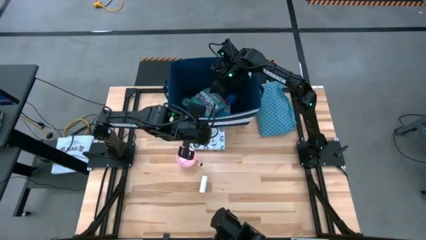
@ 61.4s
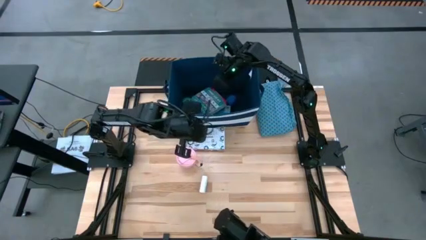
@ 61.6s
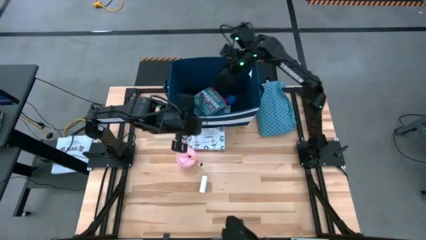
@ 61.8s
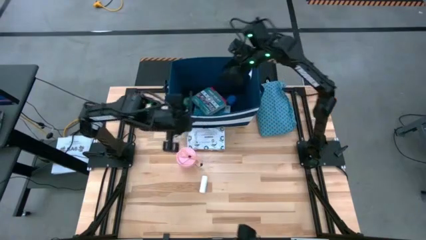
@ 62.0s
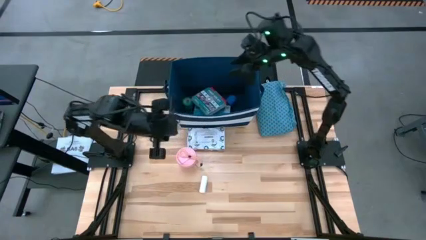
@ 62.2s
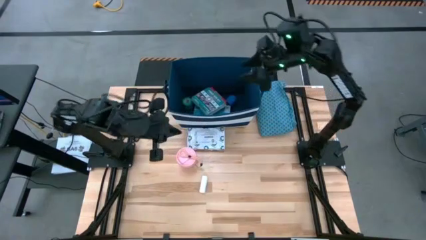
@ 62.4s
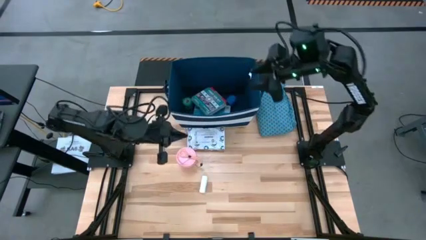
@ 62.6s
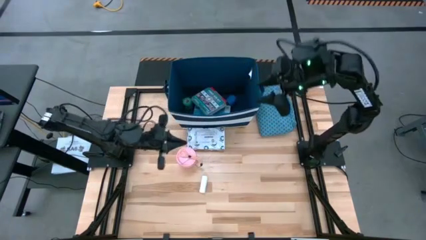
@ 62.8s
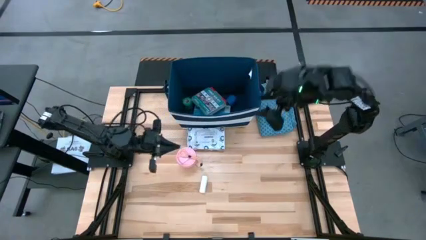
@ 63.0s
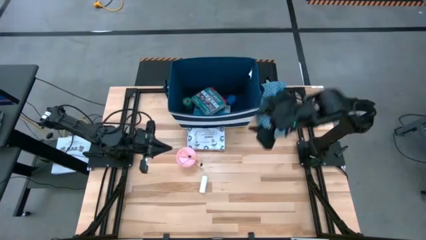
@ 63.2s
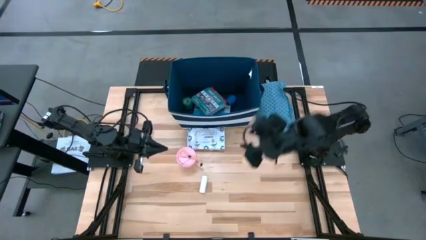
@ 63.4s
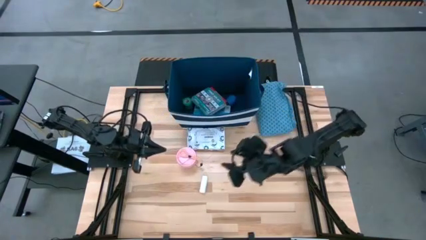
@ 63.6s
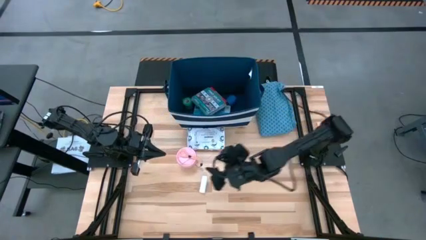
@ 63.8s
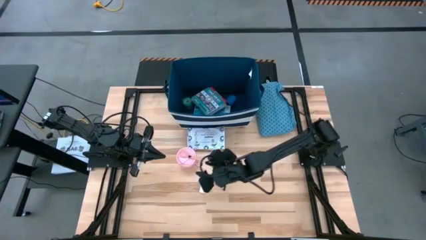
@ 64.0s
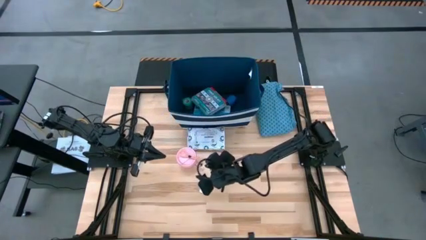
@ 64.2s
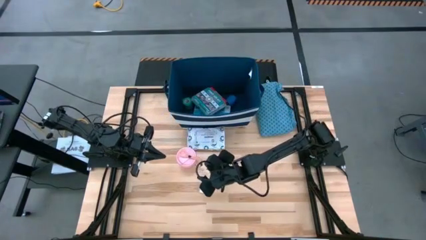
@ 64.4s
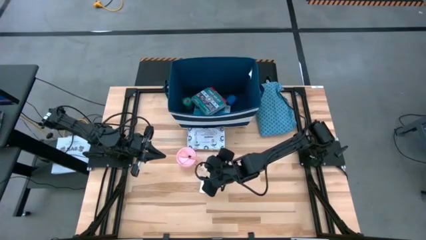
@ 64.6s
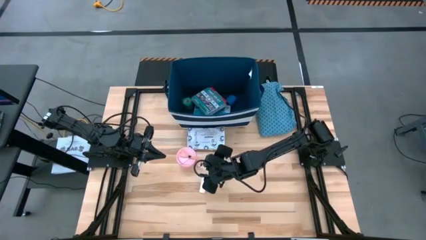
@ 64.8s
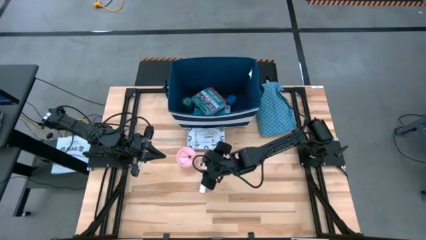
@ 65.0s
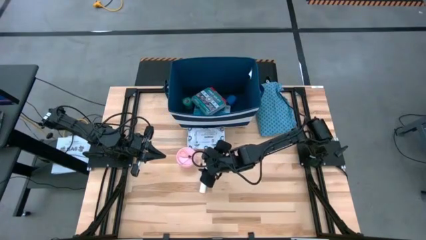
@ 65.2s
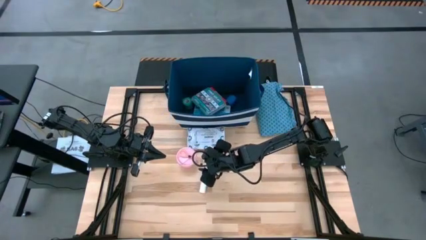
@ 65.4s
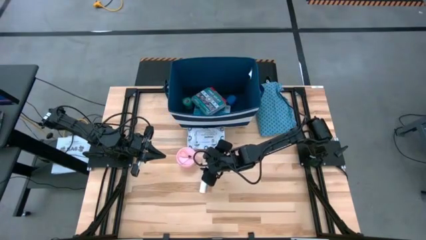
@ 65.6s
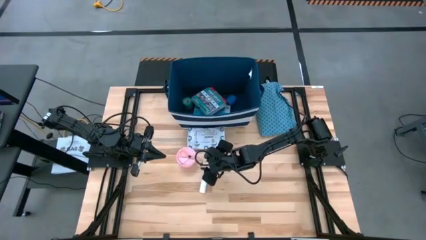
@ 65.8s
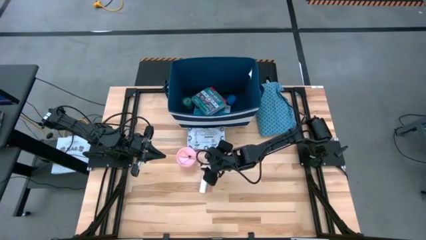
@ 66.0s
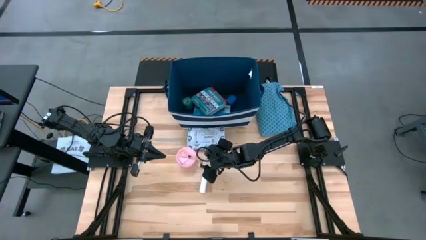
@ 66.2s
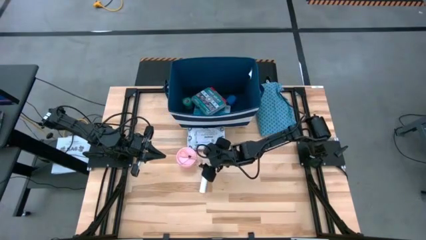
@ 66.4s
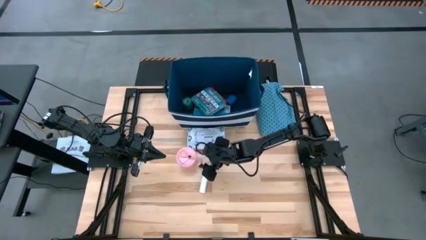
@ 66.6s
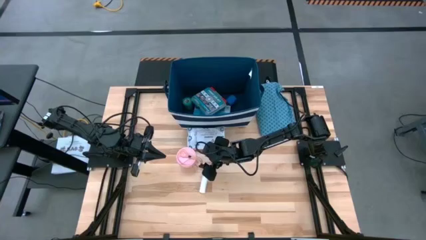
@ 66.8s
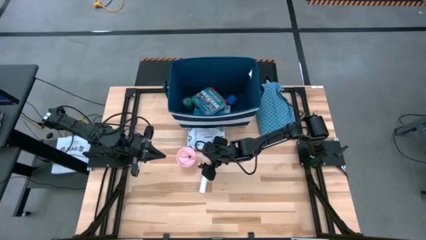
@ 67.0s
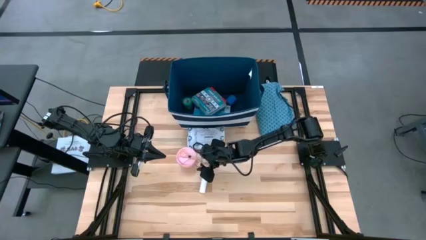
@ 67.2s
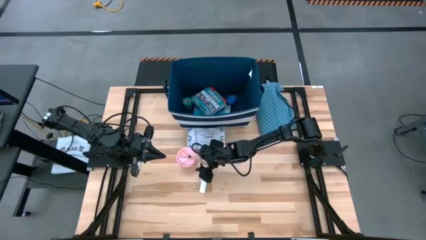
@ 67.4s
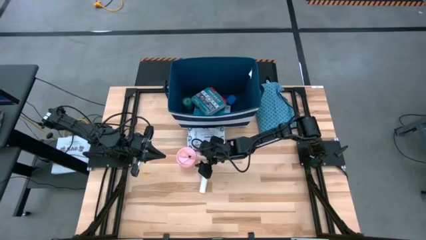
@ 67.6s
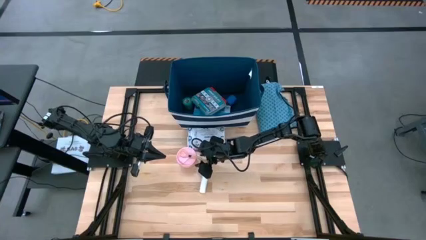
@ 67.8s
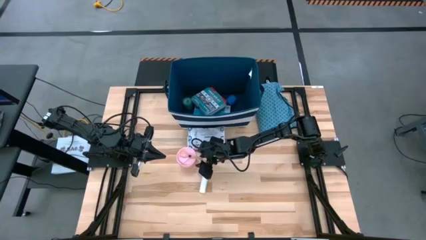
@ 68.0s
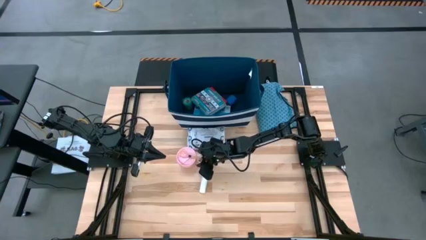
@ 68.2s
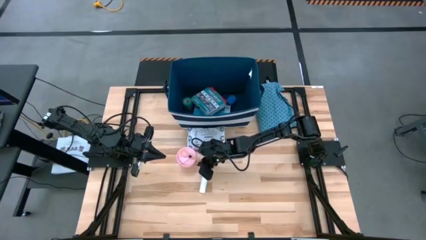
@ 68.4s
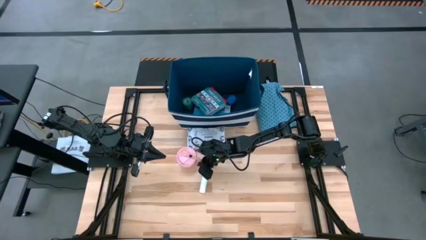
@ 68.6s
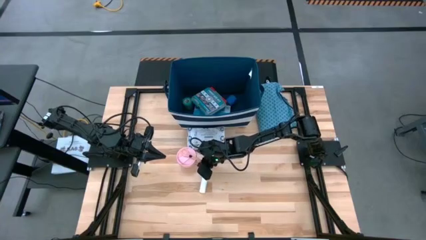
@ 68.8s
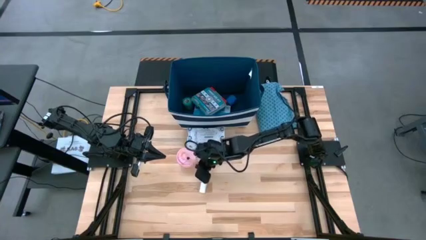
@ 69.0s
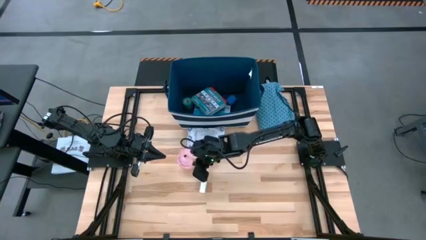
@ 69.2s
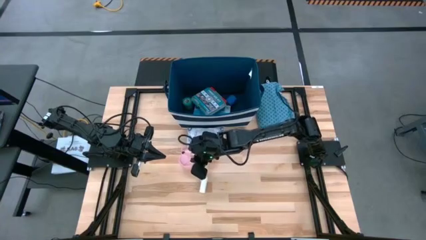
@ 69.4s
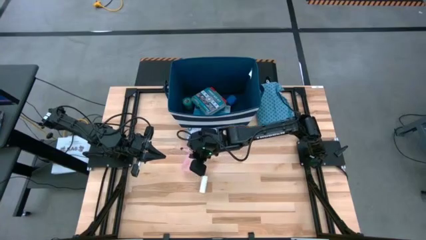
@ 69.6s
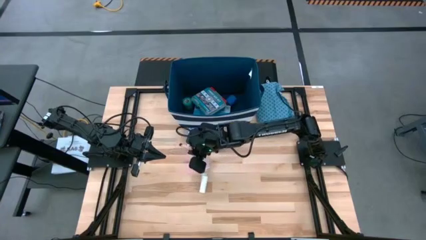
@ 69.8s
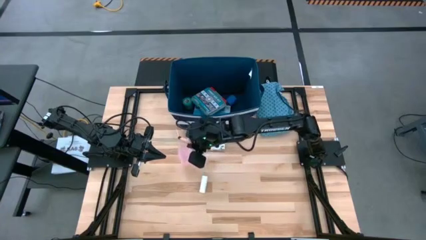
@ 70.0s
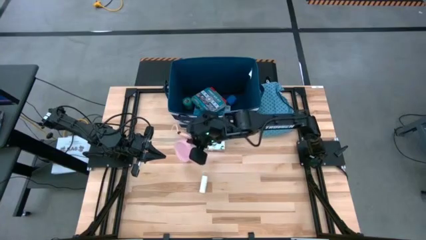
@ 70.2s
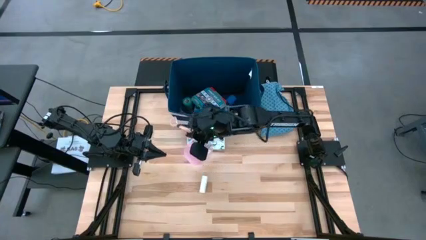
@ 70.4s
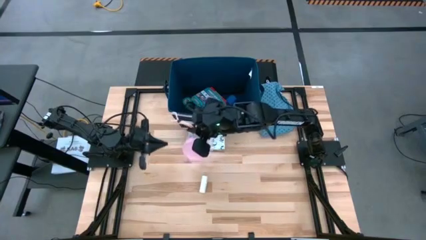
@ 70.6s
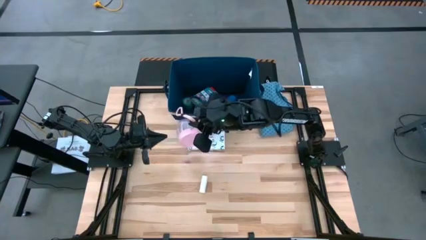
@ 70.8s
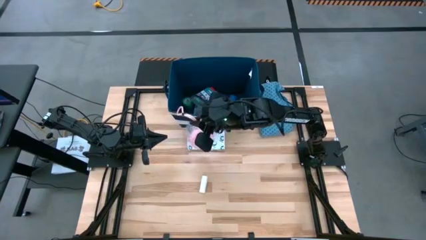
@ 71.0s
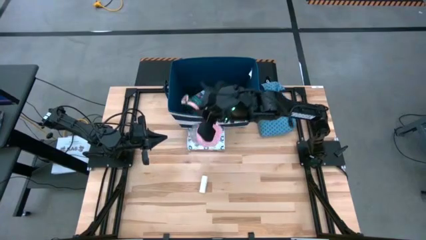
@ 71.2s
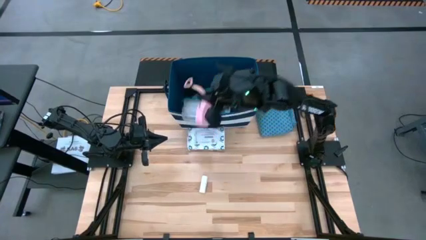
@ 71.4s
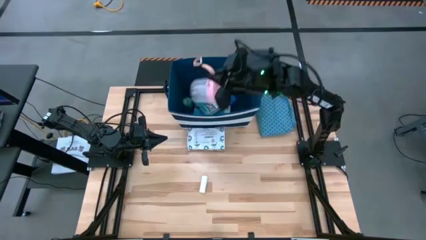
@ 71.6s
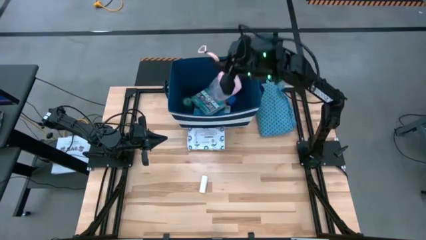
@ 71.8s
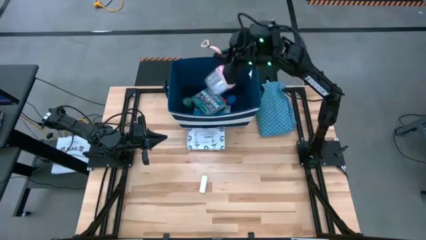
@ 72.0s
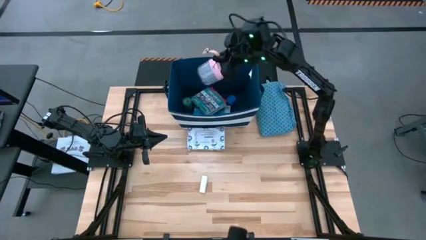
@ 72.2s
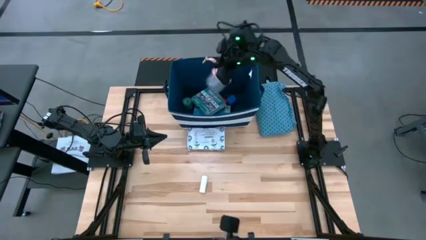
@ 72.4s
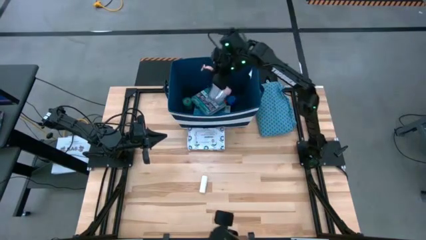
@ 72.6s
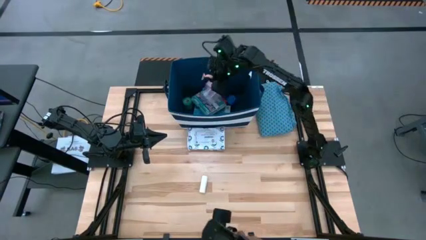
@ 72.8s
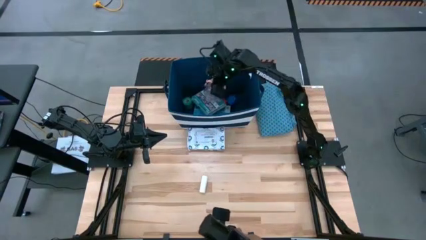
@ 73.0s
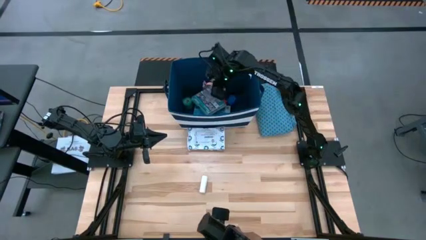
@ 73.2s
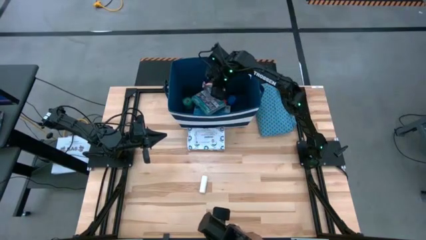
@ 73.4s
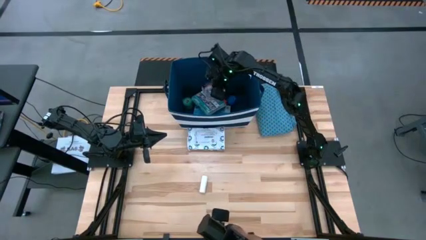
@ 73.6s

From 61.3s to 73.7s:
Task: Pick & place medical supplies in basket/bin
Put the pink container bottle into the blue bin

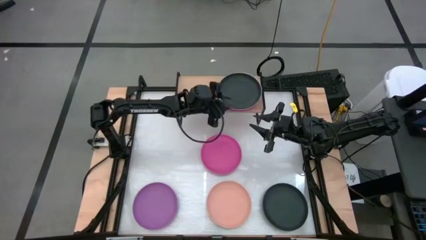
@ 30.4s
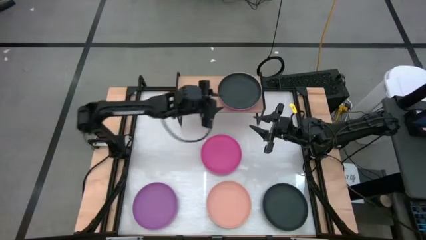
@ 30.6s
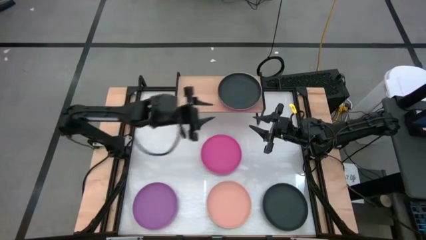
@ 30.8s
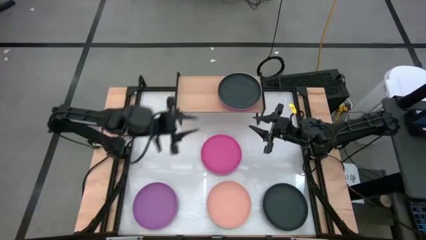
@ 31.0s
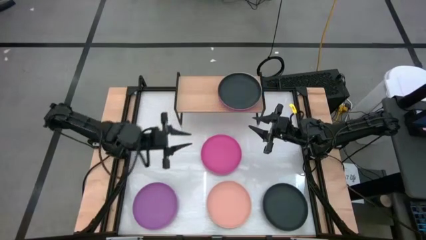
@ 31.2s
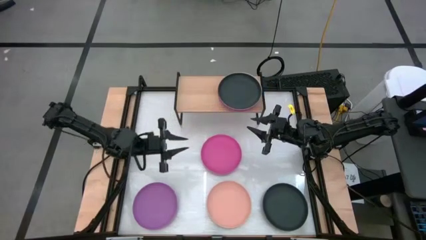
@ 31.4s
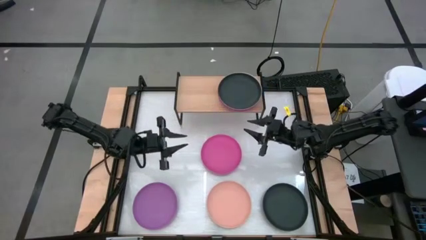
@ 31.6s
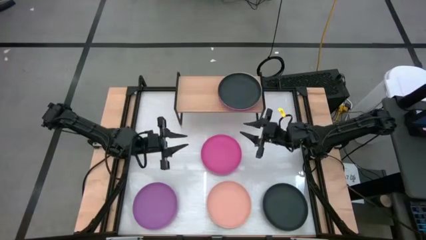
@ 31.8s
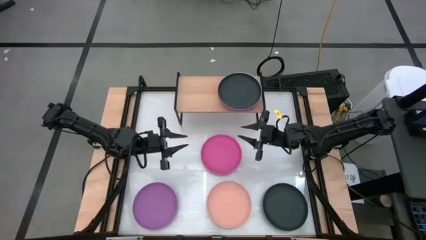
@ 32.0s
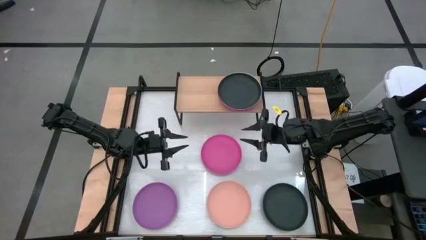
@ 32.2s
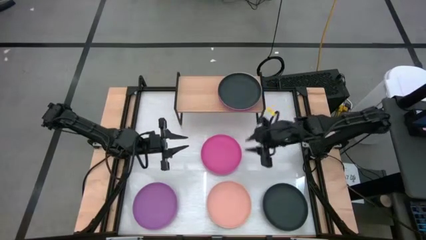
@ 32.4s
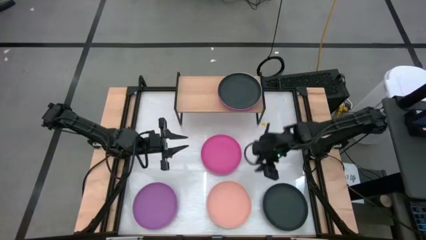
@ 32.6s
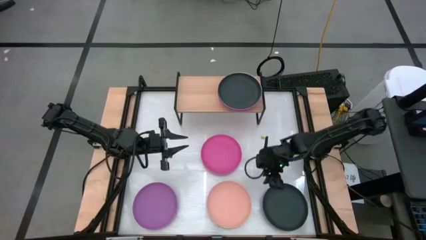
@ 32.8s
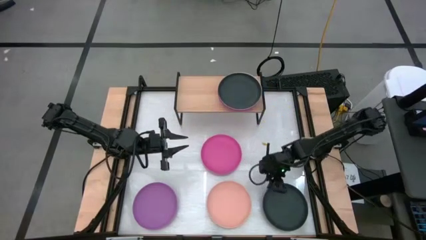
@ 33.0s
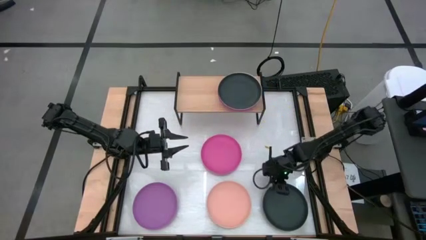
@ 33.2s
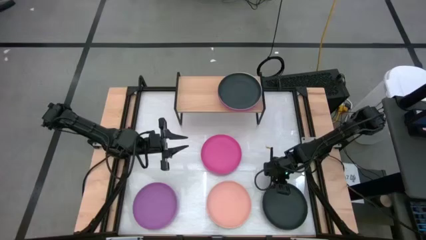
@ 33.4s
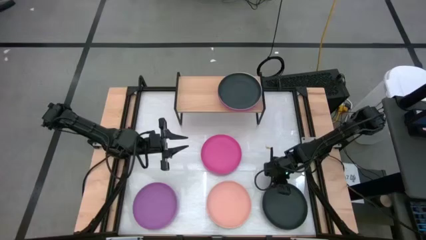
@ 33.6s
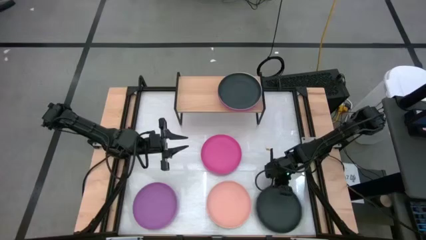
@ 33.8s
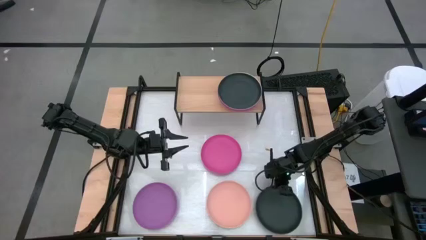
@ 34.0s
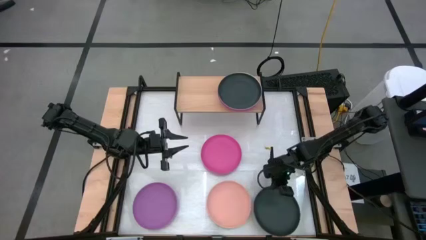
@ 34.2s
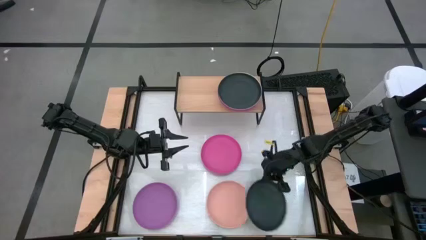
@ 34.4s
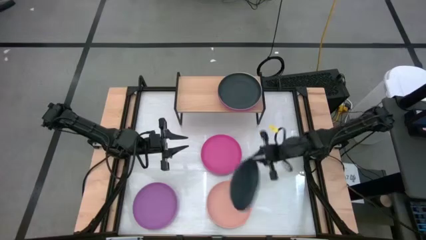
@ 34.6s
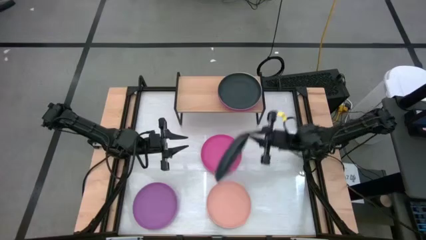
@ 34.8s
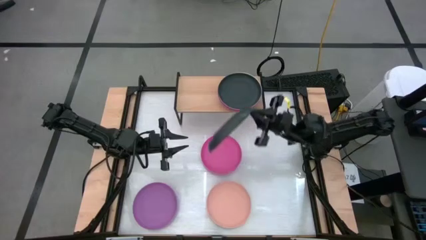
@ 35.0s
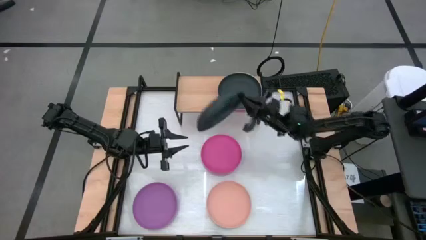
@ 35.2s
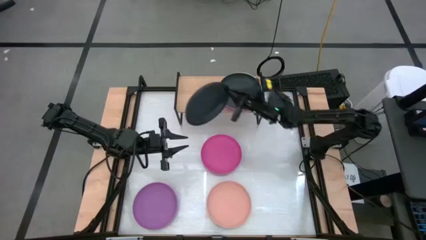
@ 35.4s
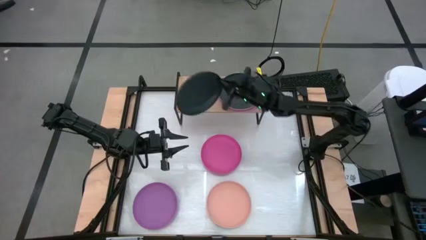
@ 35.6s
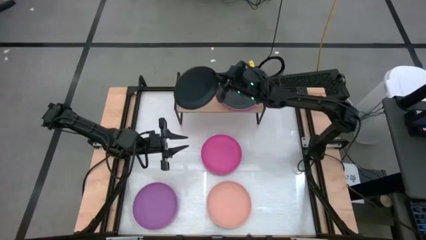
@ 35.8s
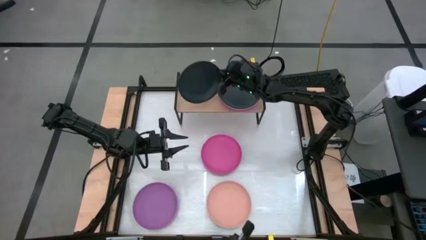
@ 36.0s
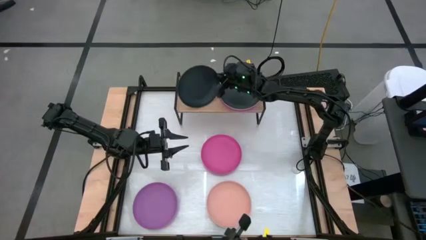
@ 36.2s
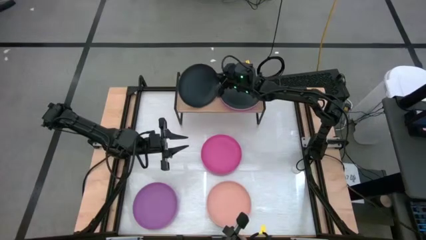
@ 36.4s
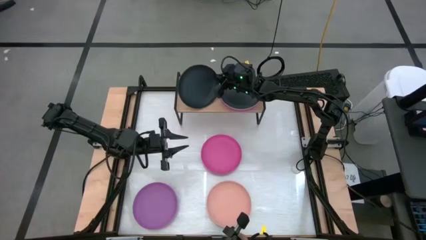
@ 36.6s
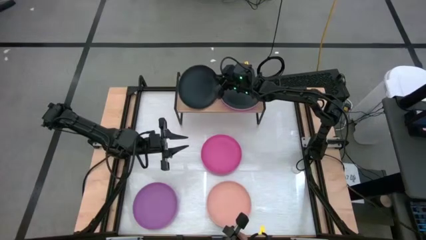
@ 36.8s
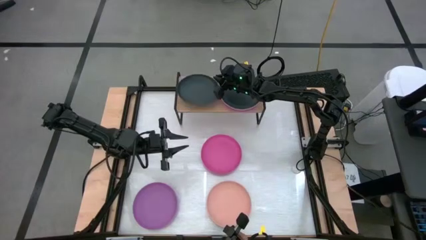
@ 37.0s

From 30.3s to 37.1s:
Task: Place and stack plates onto a shelf
Put the black plate on the shelf
